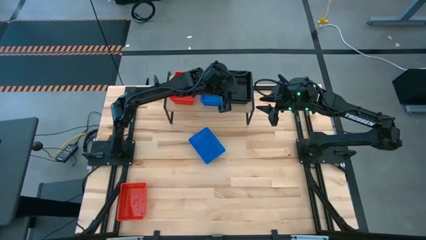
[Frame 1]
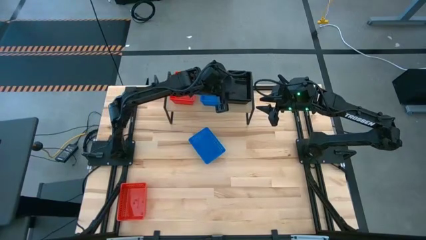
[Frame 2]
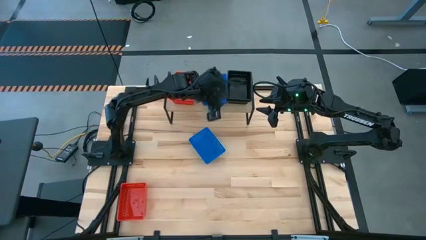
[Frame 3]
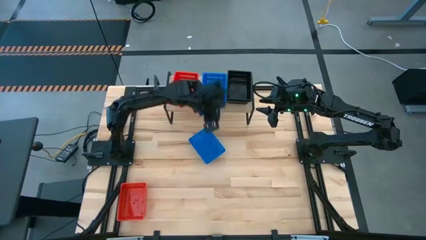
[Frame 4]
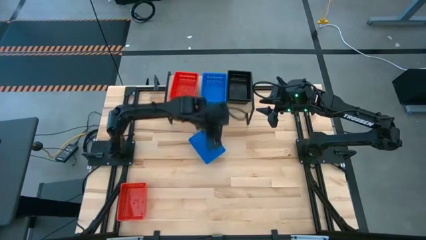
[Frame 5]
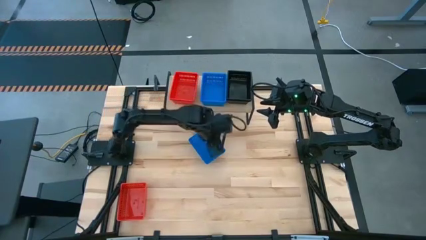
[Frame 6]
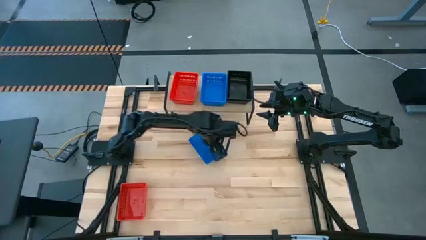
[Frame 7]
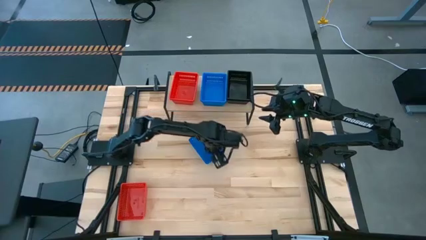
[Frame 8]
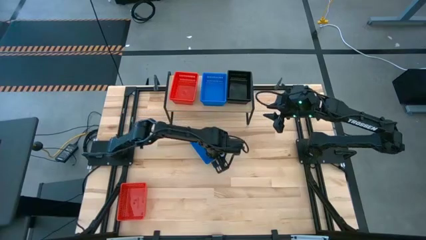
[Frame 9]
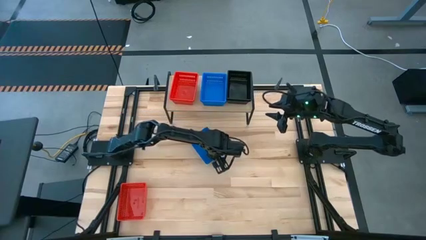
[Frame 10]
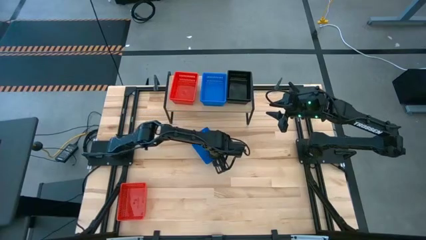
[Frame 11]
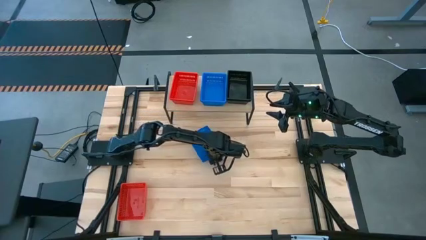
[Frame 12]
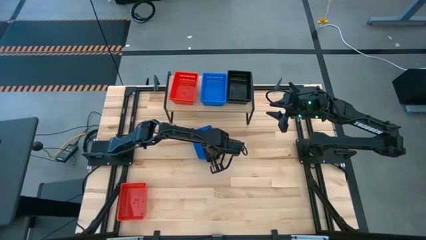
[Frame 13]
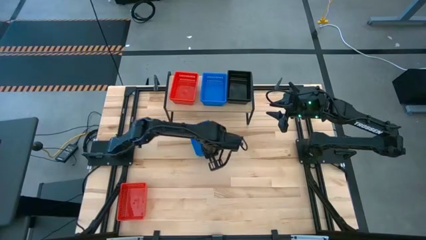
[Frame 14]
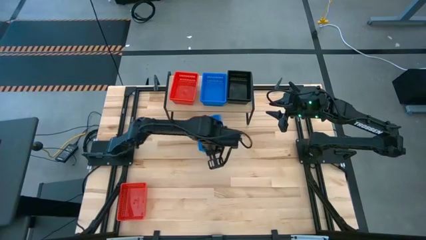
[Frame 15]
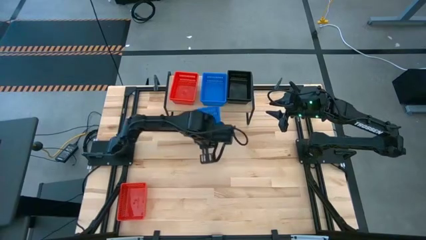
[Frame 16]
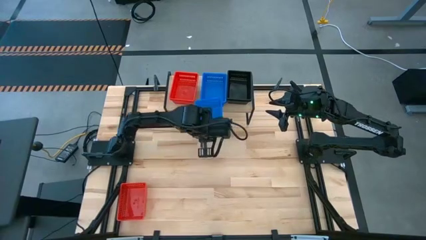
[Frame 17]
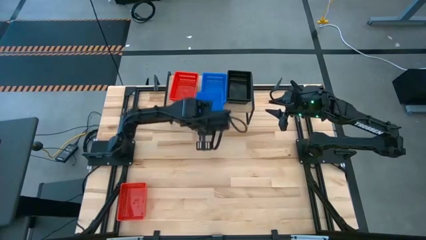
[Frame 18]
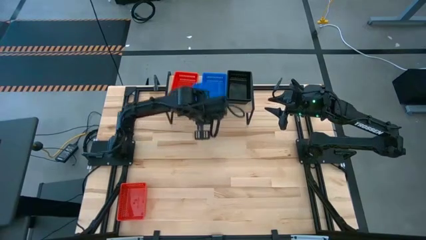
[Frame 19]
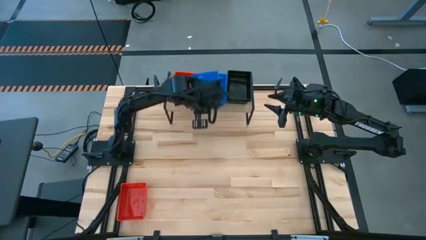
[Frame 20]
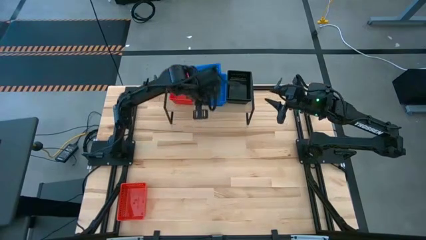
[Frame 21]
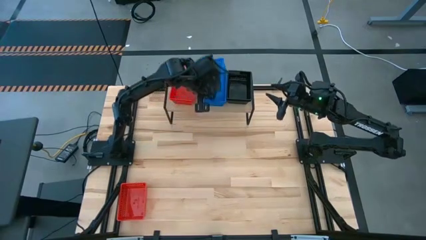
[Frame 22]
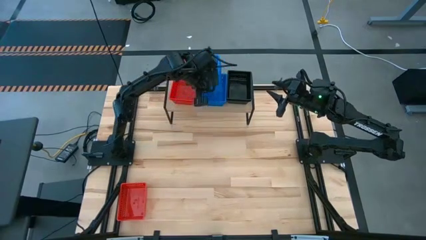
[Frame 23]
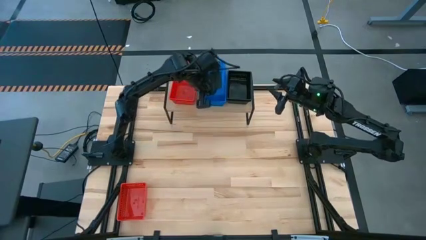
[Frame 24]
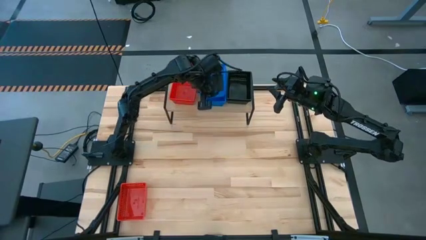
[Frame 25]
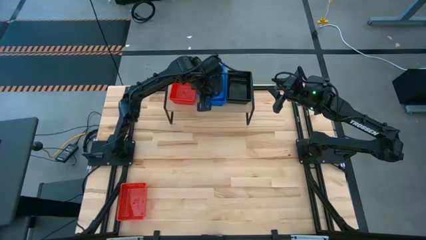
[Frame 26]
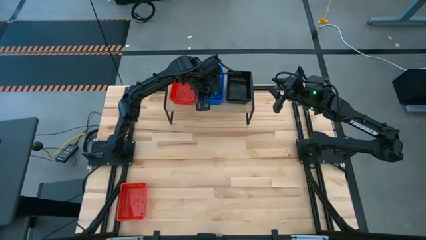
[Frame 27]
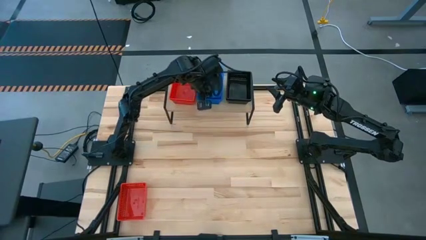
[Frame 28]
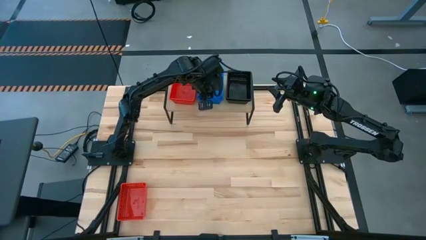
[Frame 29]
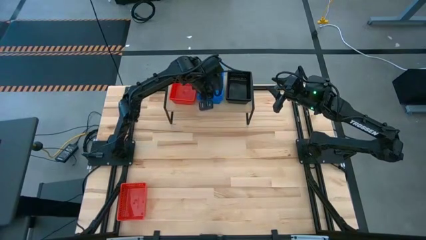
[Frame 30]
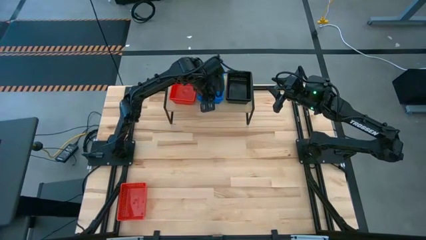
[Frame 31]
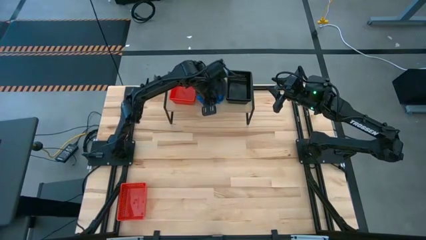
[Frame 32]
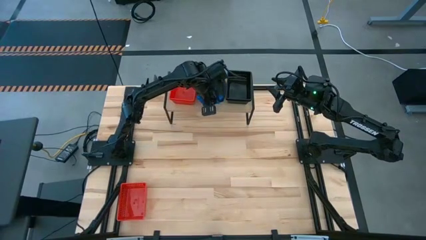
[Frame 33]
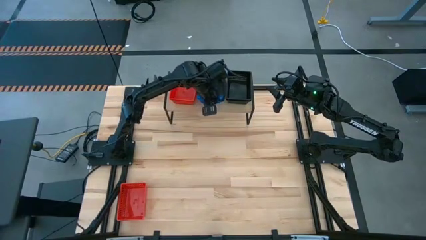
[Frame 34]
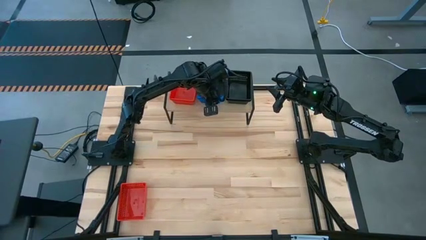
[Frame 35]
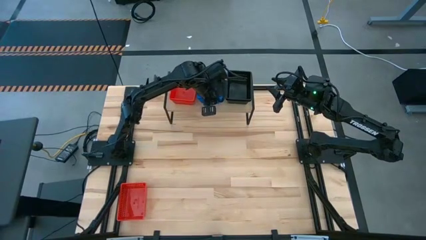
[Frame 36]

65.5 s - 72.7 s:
Task: Stack baskets on shelf by color
Stack the blue bin on top of the blue bin on the shelf

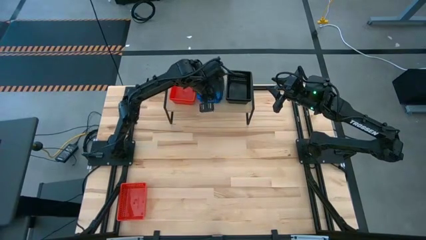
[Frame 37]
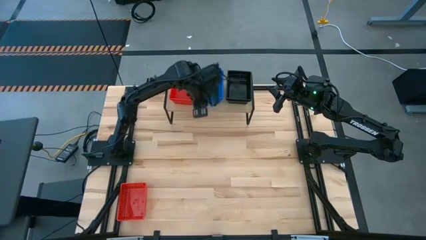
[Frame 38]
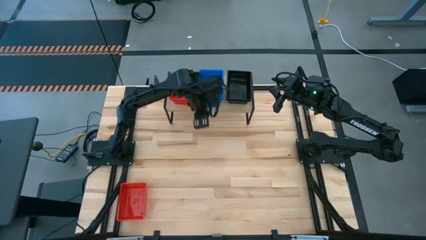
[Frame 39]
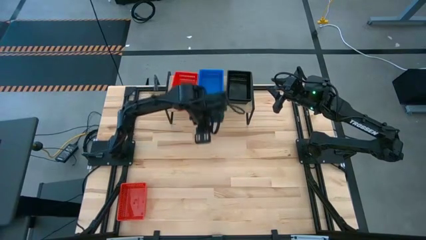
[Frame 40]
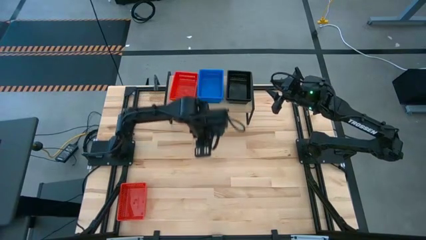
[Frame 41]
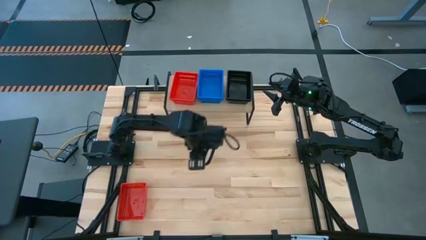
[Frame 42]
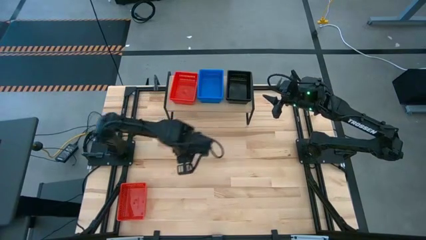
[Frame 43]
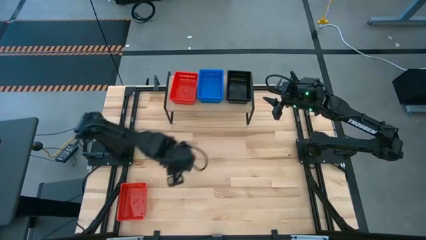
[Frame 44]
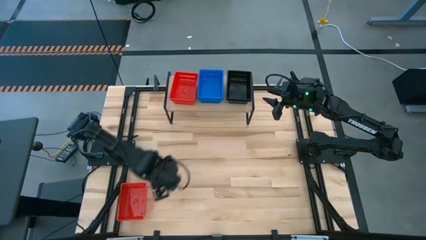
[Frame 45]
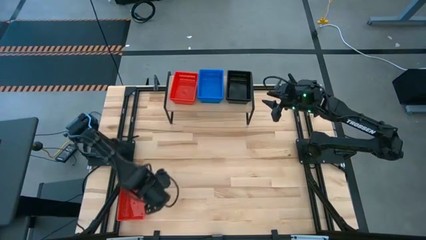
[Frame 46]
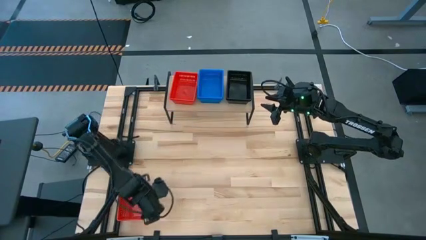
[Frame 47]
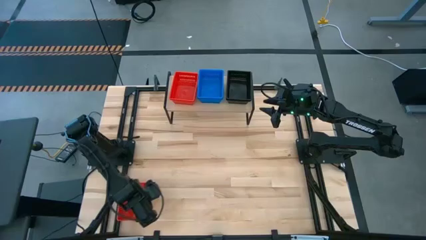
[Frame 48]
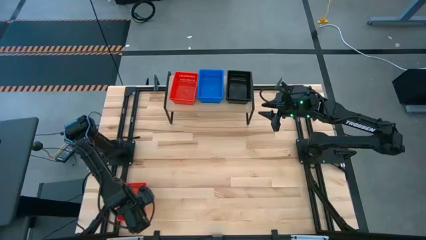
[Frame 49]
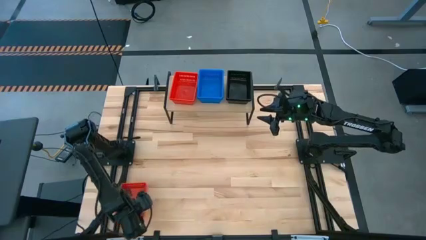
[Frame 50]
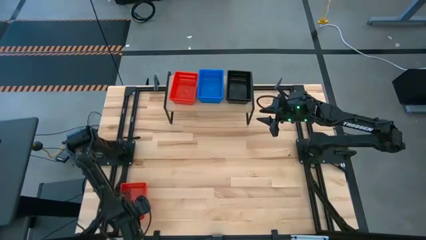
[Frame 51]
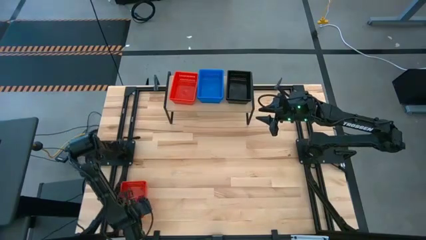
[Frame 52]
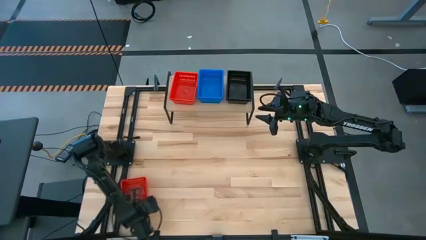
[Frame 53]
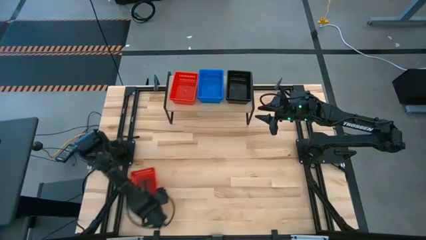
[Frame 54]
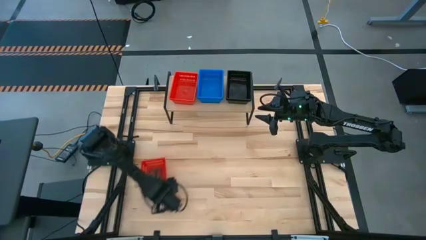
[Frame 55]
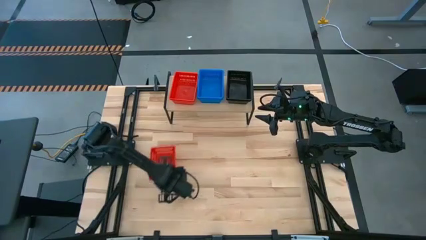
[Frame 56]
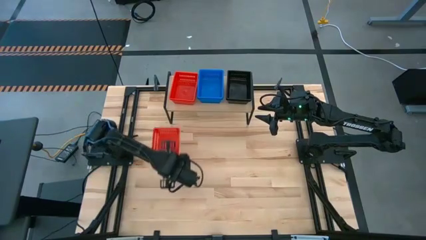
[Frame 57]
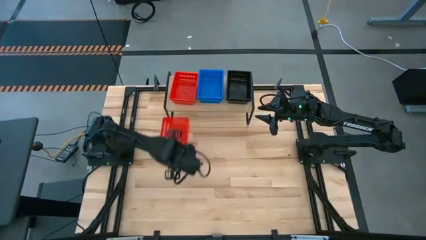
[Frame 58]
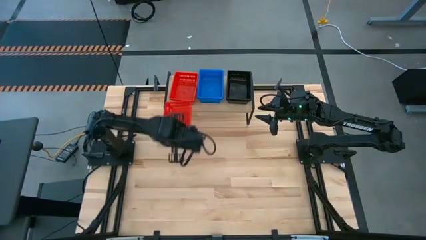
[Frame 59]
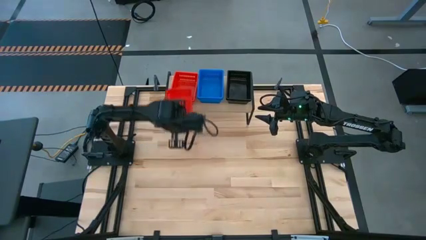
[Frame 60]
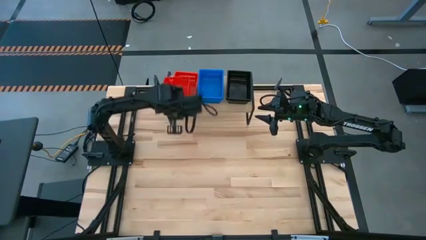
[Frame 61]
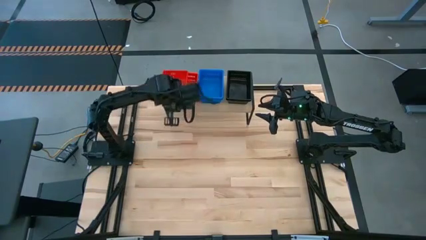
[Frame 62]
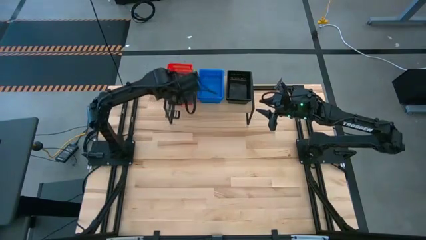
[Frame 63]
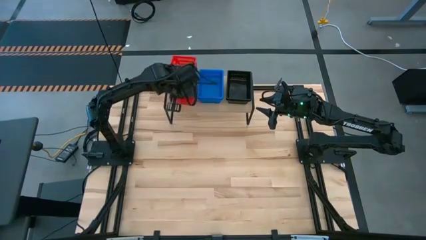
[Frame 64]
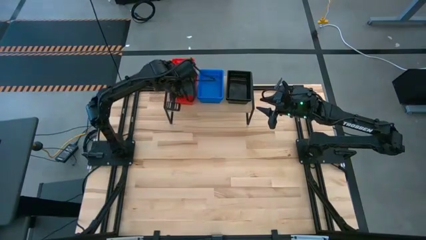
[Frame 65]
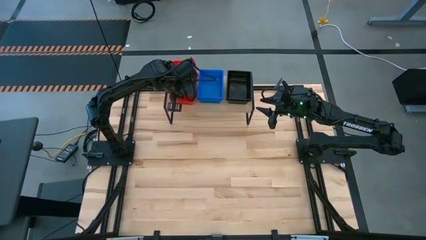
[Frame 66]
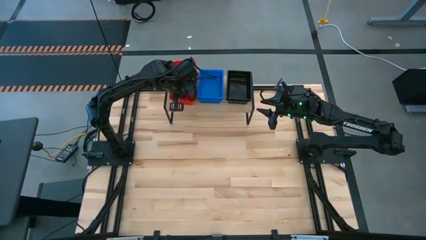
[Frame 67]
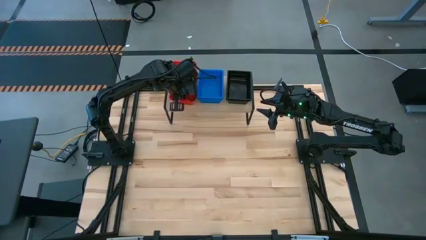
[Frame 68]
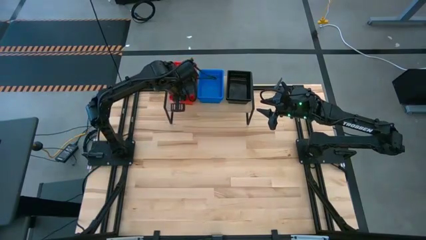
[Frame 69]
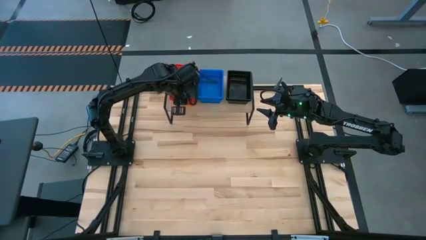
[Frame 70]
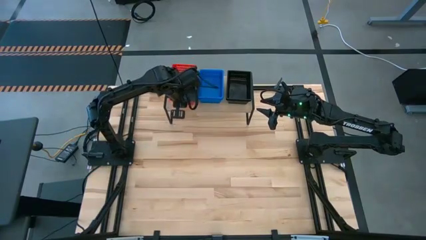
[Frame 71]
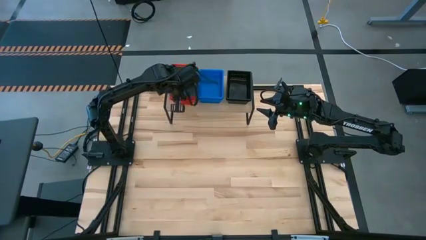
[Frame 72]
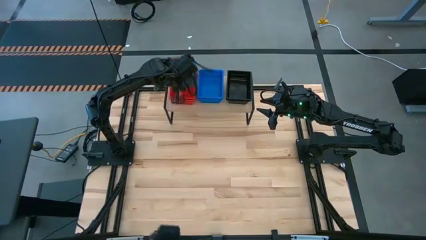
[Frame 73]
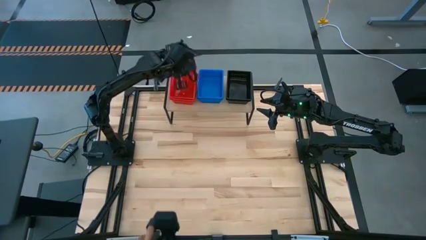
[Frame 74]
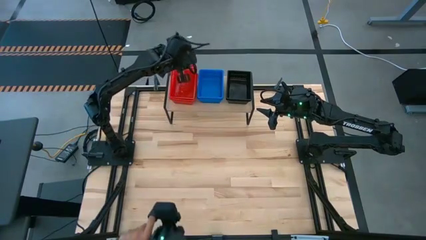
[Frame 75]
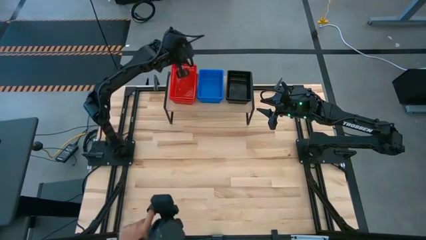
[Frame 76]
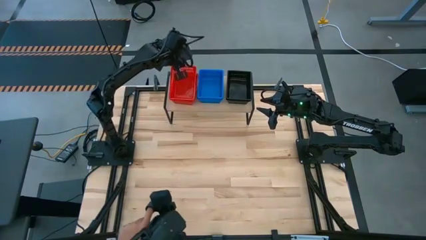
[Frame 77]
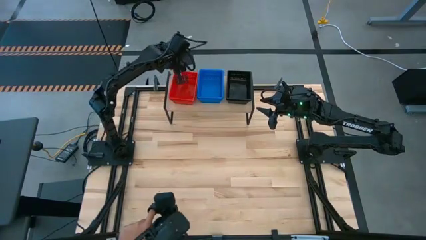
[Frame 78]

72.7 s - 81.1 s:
Stack the red bin on top of the red bin on the shelf

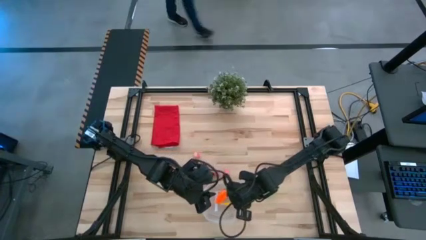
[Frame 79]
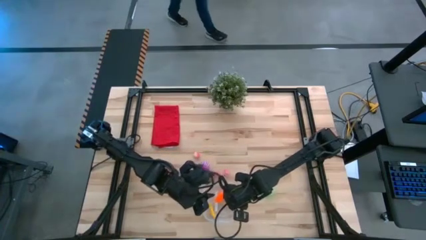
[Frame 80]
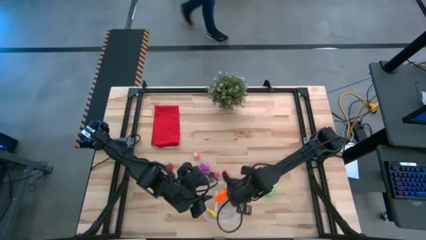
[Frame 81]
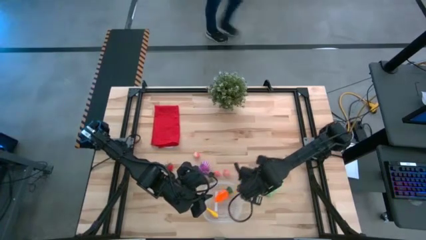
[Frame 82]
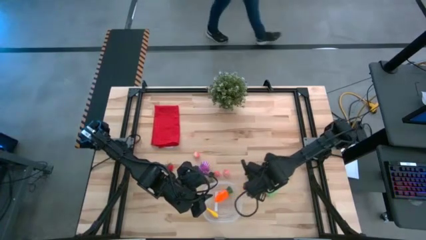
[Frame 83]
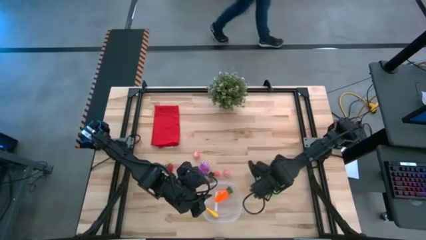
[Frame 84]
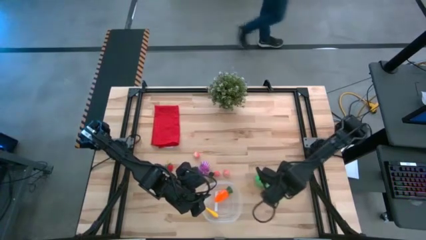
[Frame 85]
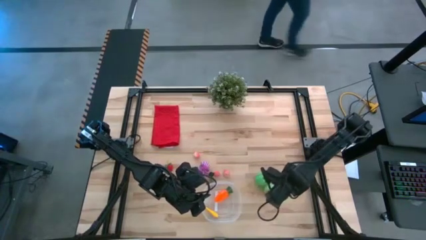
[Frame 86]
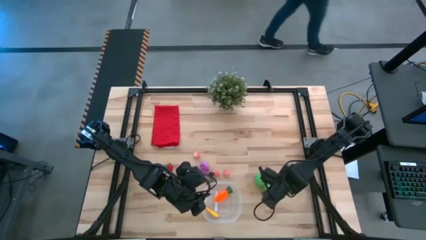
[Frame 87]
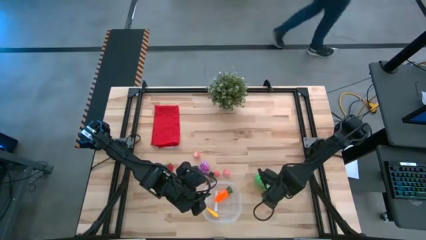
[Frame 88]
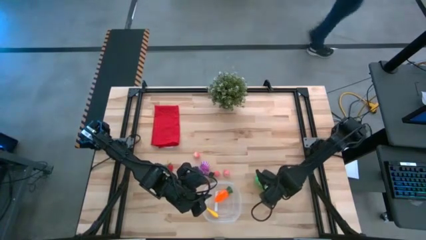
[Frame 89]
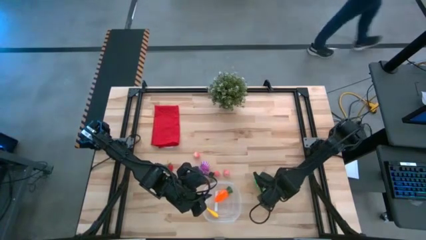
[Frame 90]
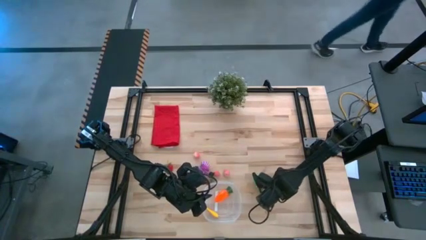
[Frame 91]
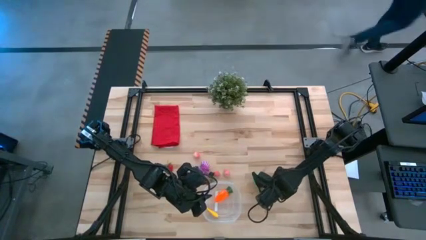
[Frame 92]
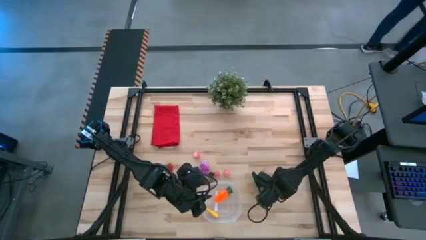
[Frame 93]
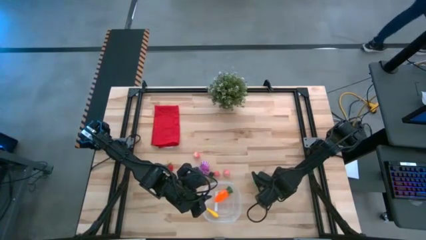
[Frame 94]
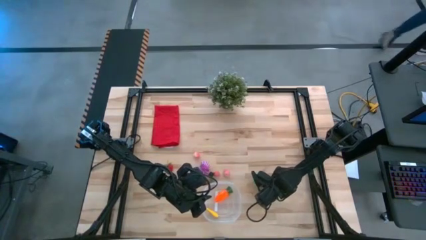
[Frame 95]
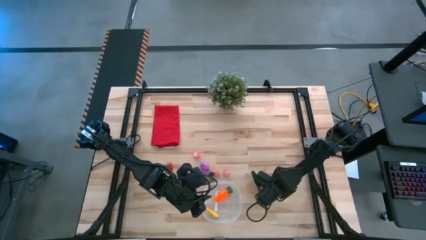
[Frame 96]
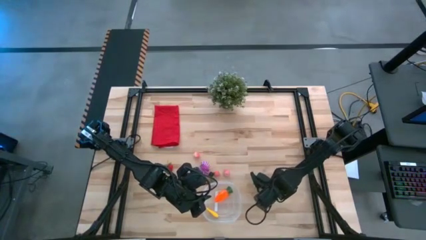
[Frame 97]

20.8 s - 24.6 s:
Task: Pick and placing Produce into tupperware
Put the green cabbage into the transparent bin
